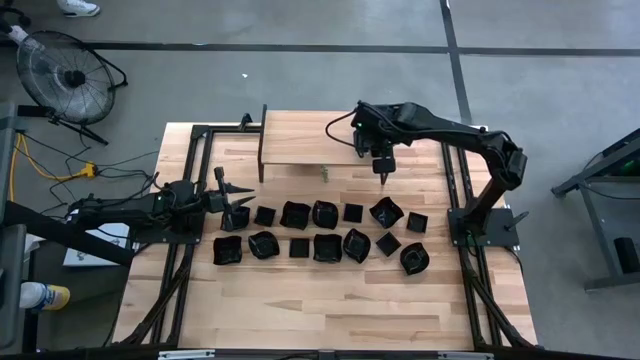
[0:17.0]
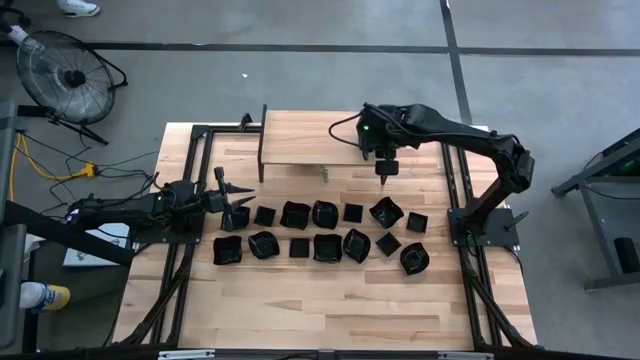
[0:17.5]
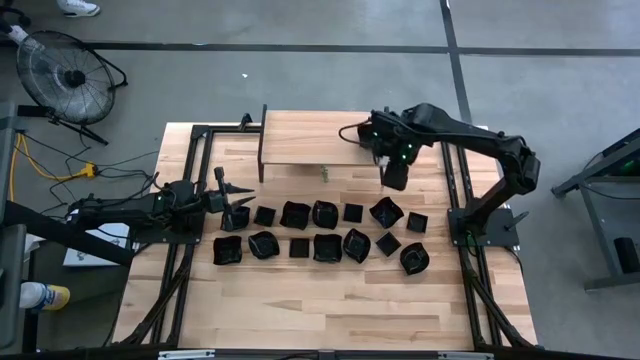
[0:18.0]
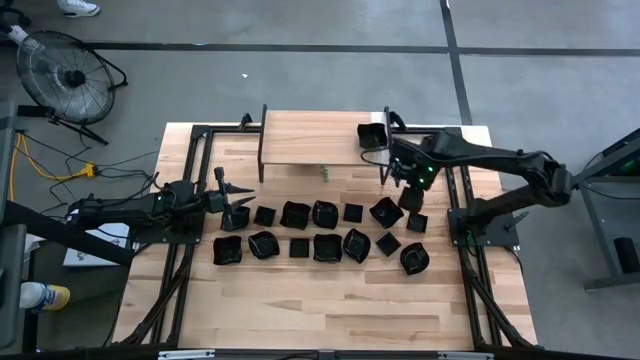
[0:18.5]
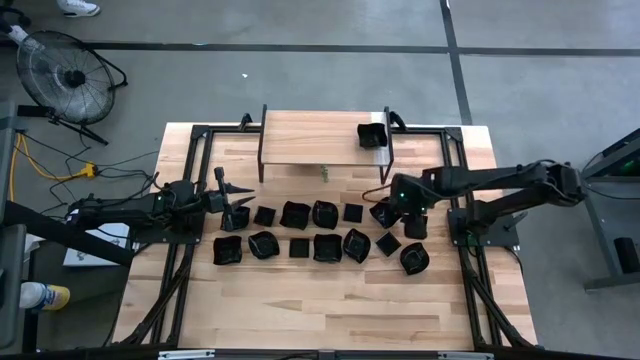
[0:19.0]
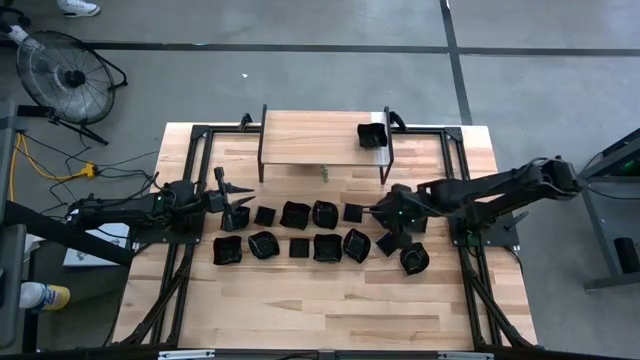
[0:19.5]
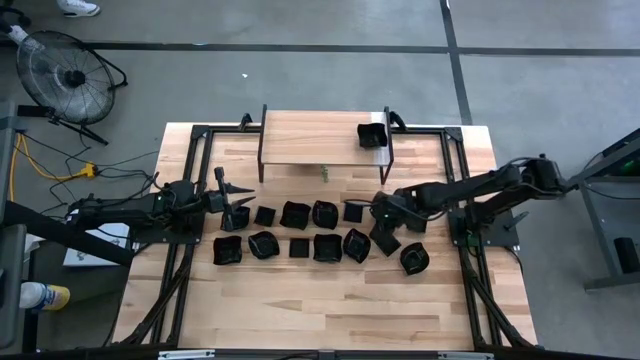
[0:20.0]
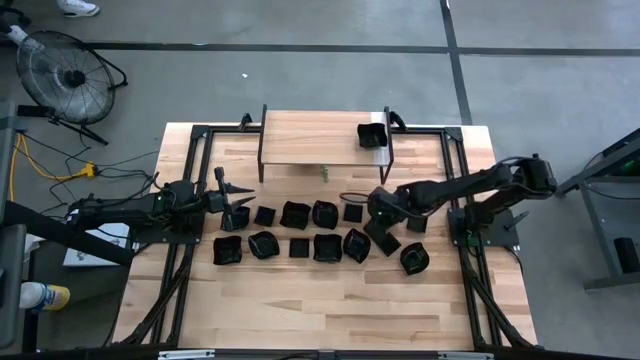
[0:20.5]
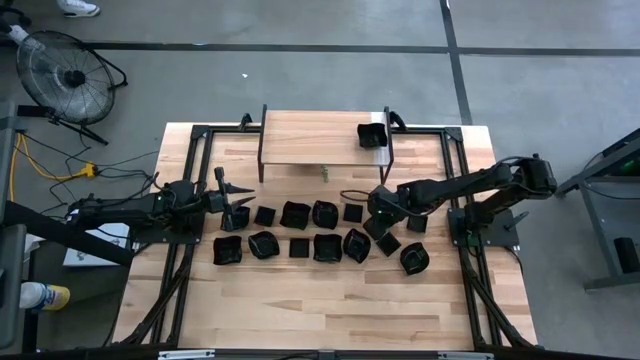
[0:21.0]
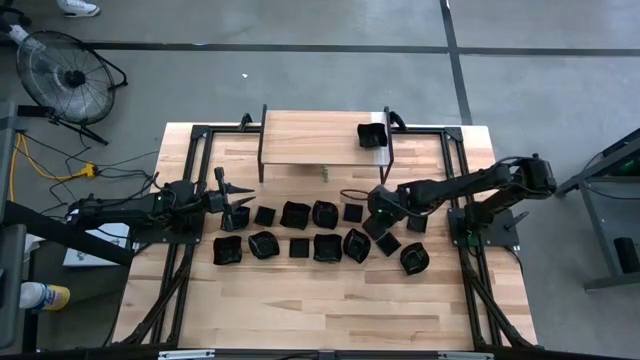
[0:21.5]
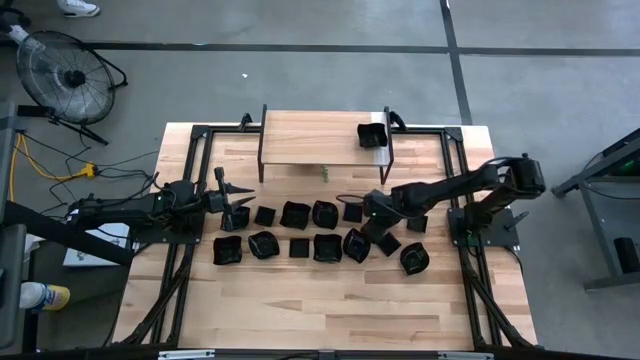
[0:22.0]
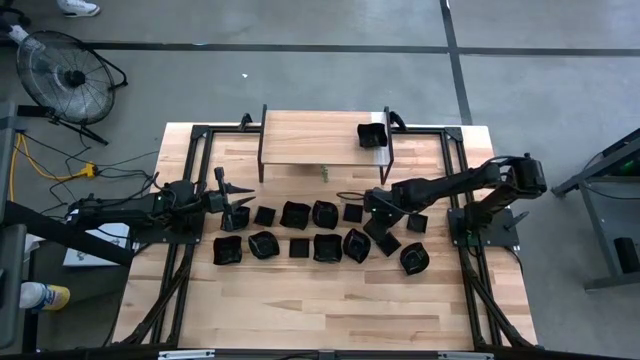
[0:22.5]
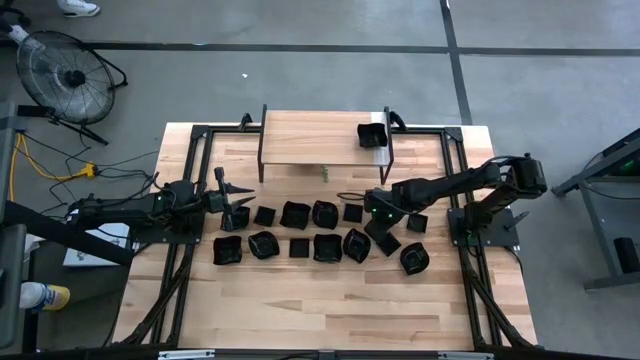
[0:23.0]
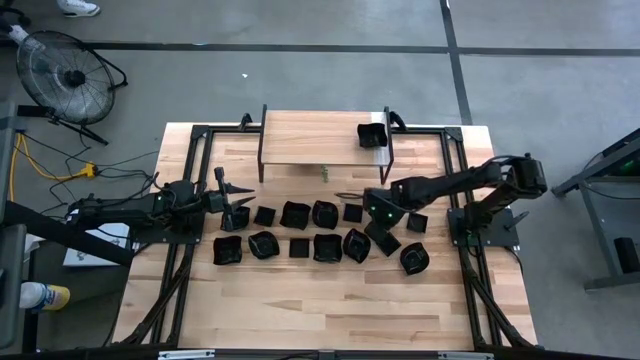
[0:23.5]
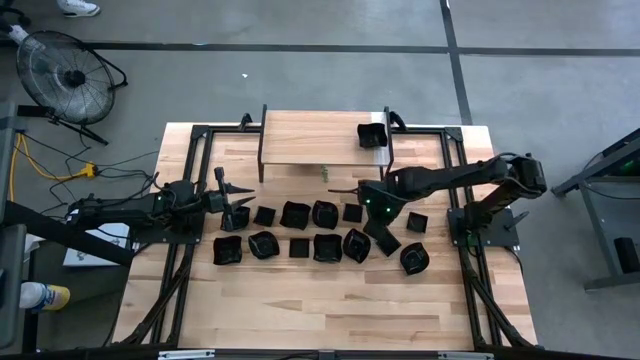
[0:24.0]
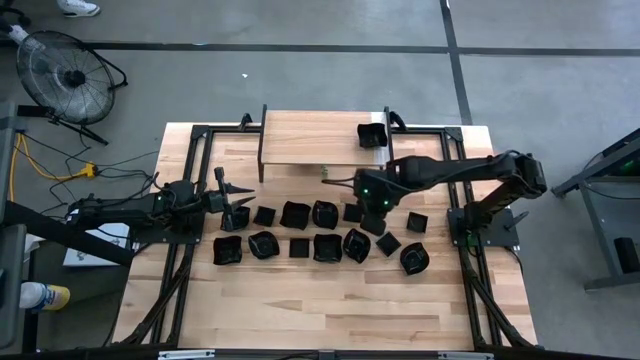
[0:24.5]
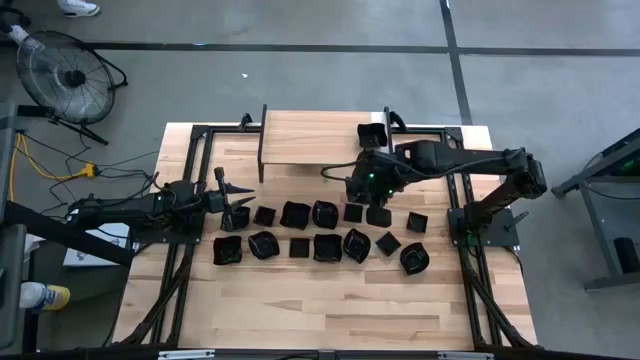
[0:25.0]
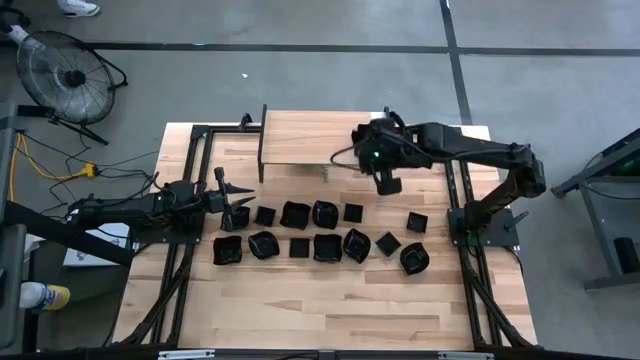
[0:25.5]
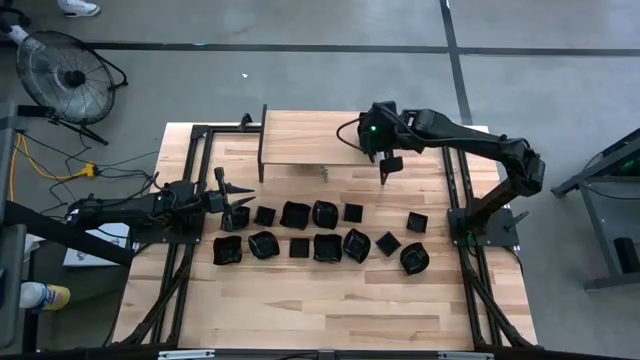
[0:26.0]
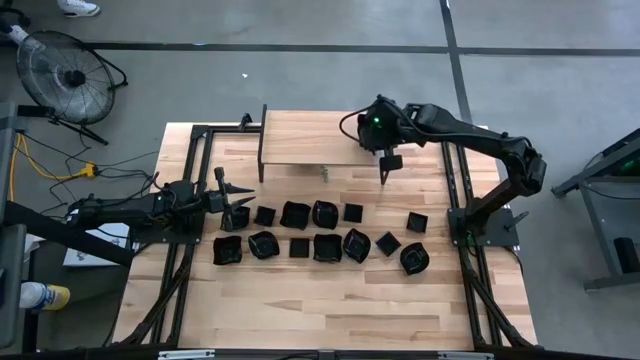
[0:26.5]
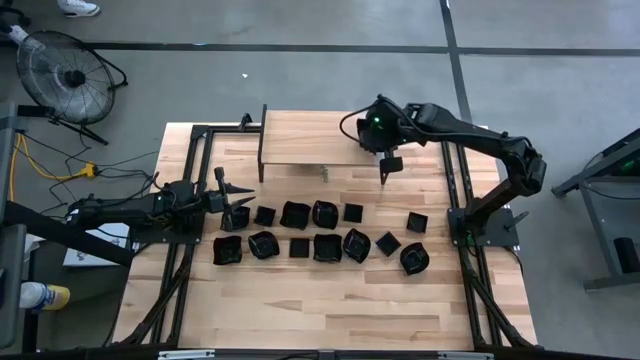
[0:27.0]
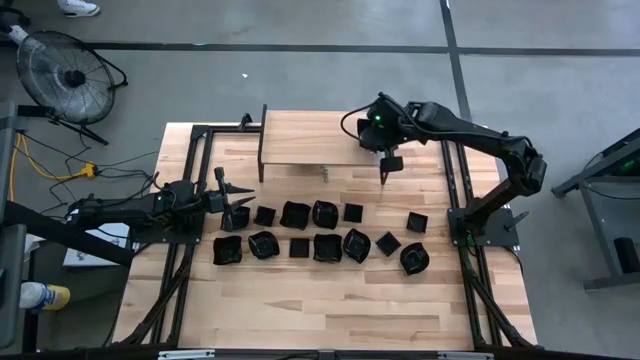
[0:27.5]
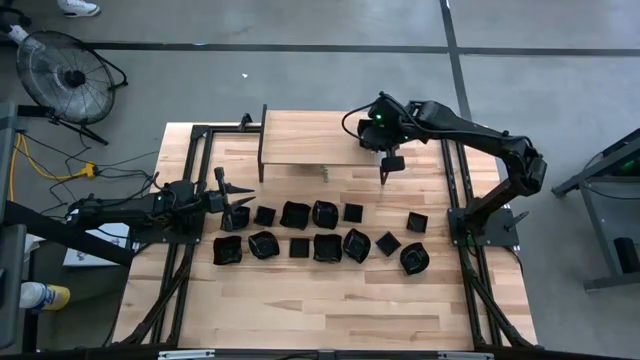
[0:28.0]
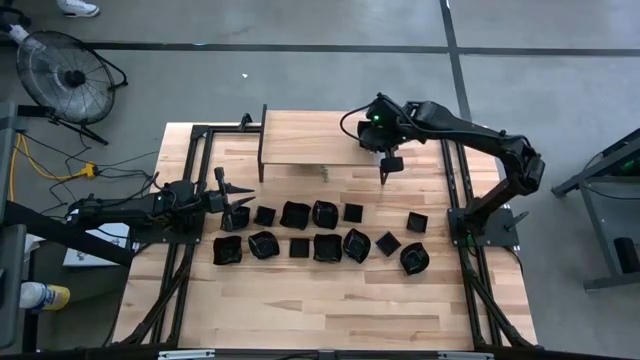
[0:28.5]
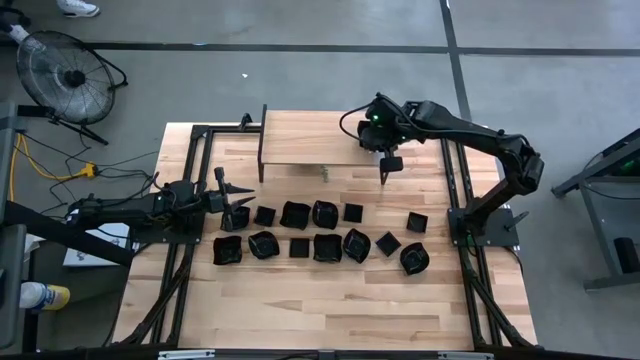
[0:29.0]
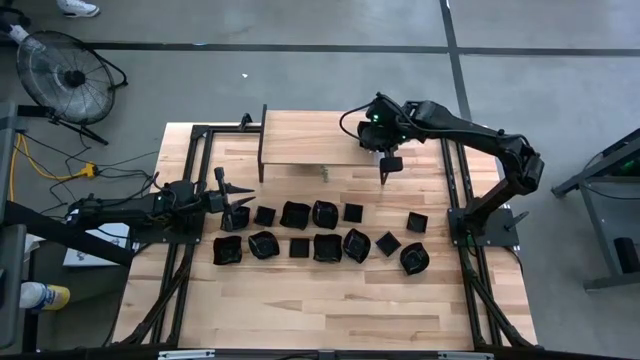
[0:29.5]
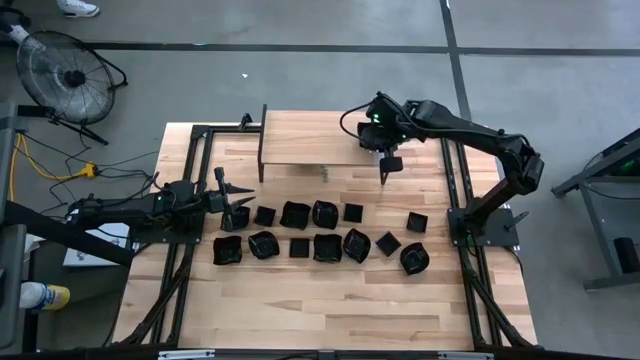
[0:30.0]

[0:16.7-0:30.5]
Task: Pick & Place Mini shaped plates
Stack the distorted square plate on top of the other distorted square plate on the shelf

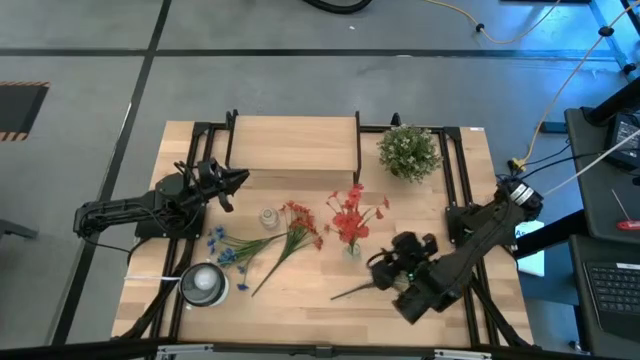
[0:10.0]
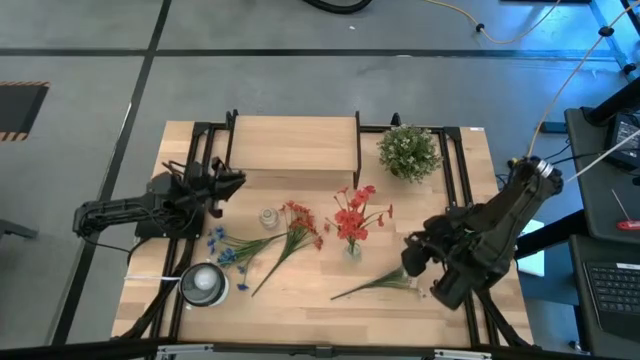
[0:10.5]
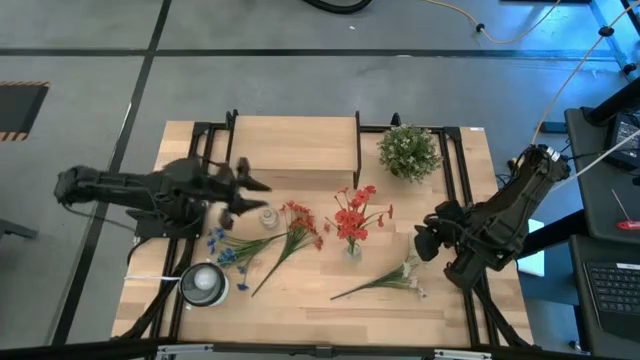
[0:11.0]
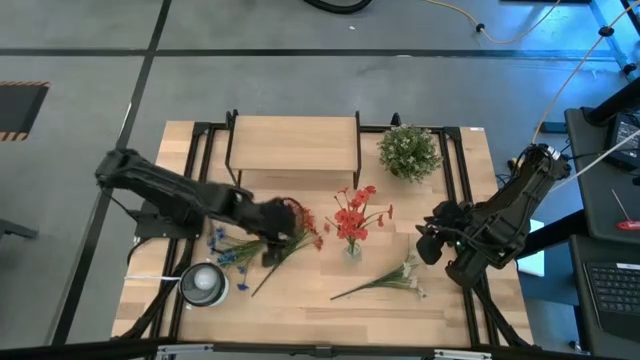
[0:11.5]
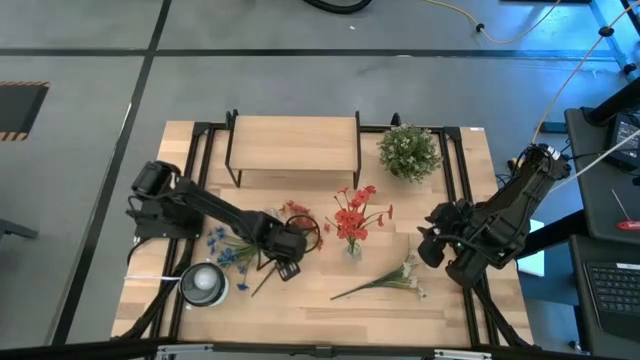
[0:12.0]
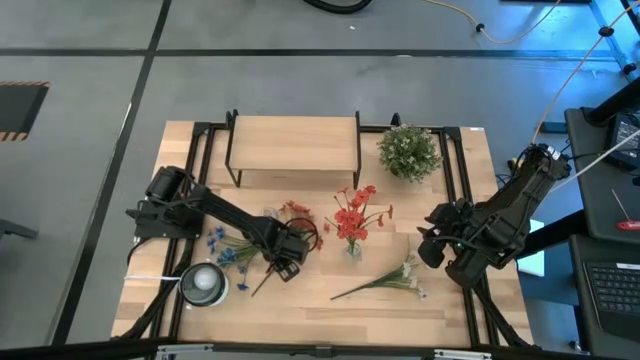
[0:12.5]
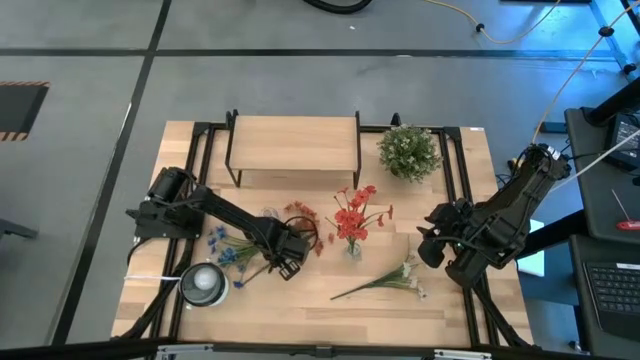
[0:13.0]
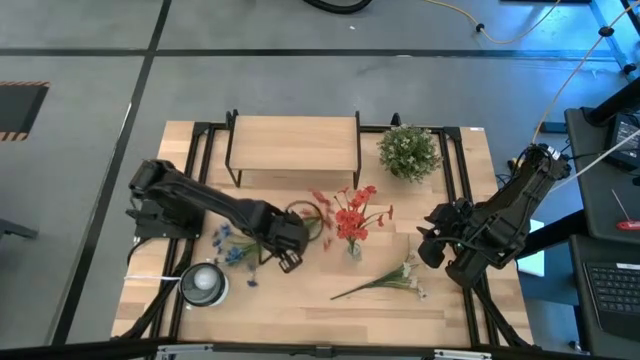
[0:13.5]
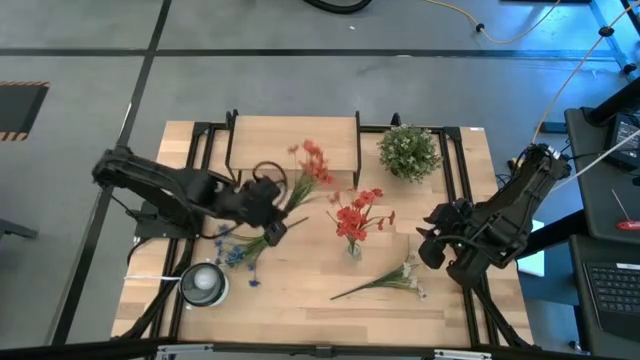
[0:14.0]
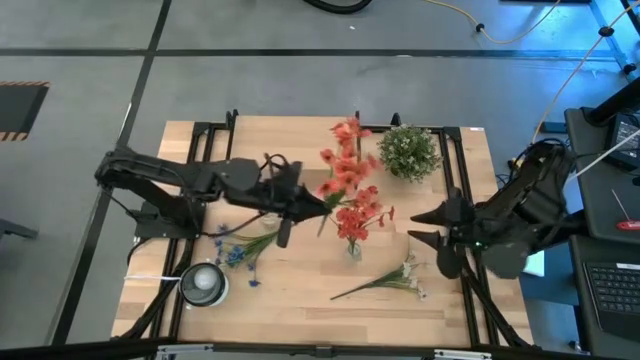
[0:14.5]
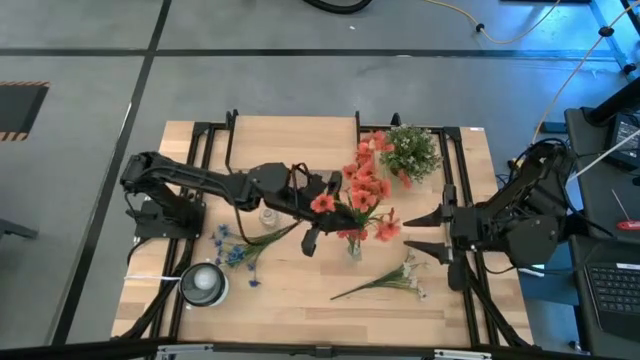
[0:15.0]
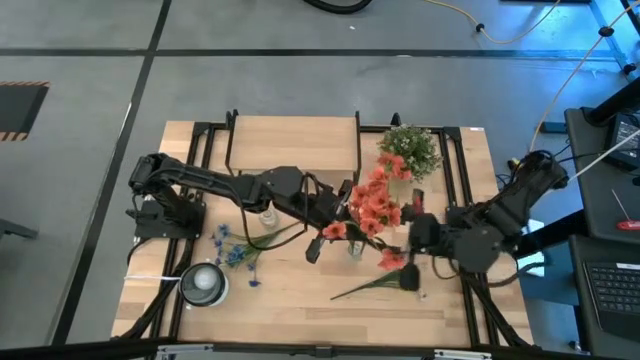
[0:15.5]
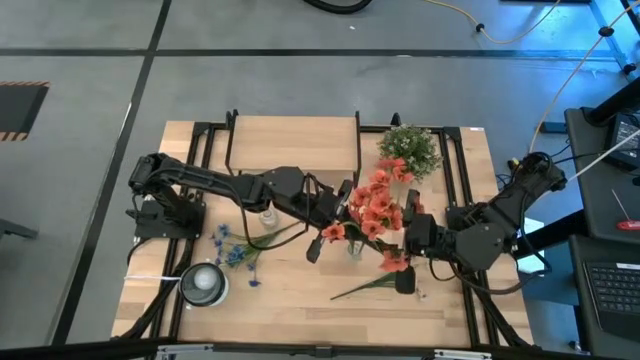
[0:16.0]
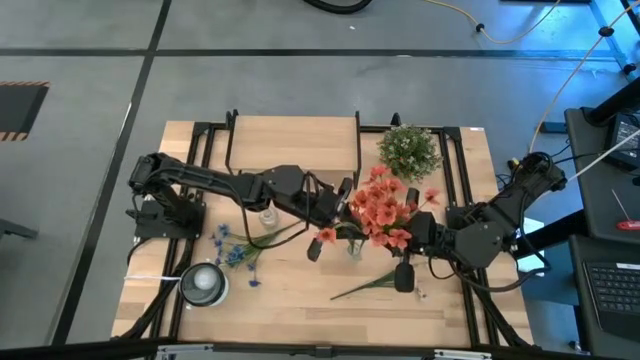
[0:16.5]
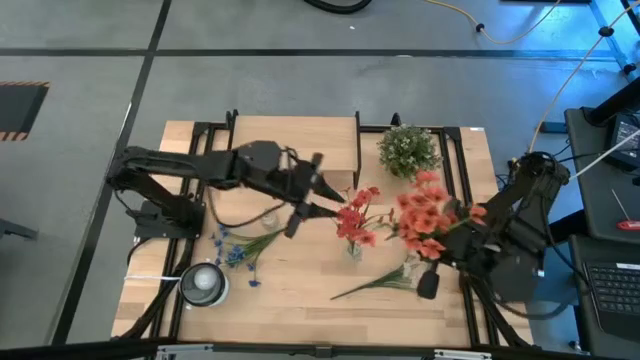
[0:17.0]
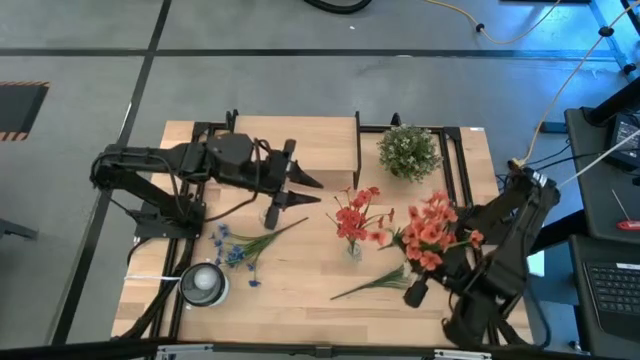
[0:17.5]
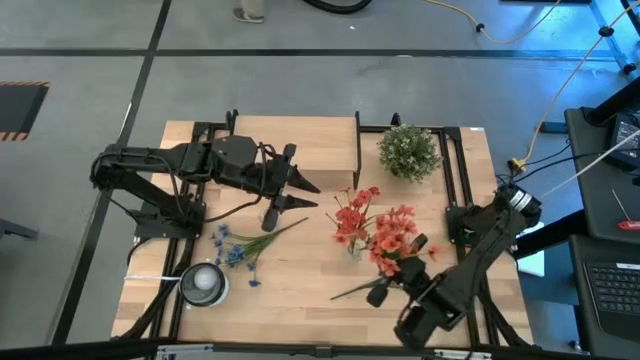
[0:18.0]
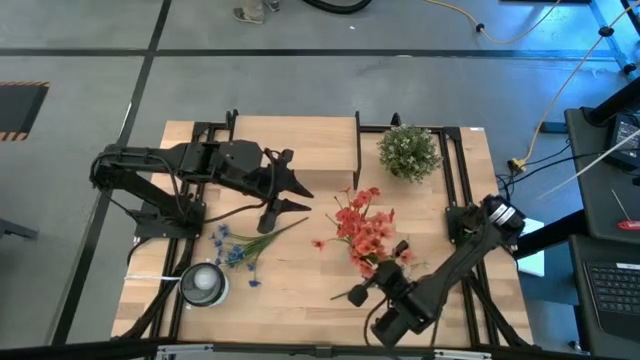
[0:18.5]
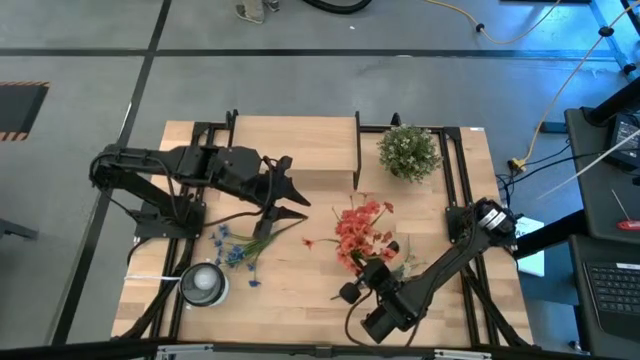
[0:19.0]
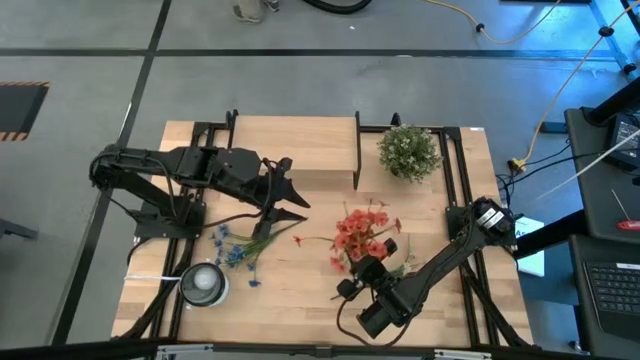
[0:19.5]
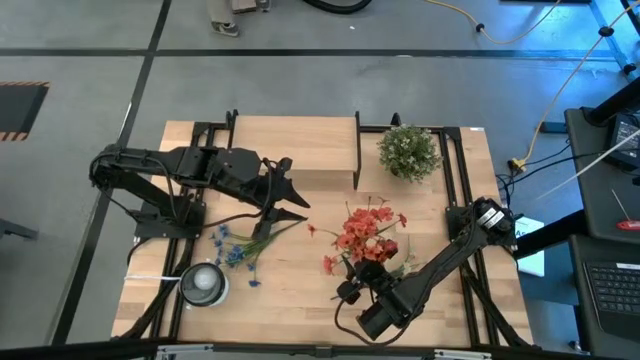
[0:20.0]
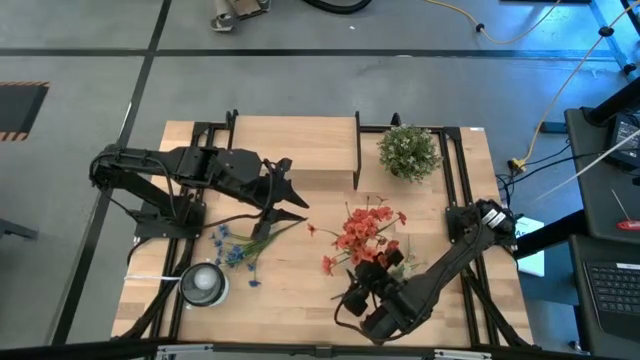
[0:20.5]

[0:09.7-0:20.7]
Task: Pick and place flowers into a vace then onto a shelf
Put the orange flowers into the right transparent vase
